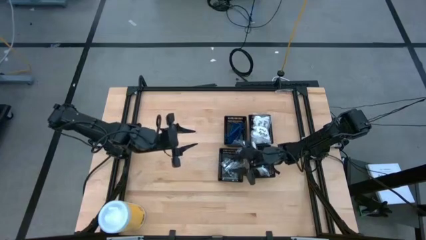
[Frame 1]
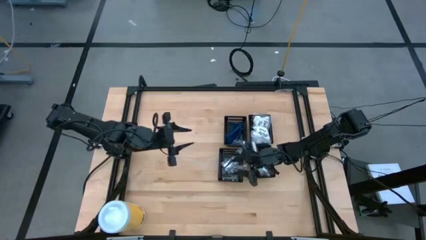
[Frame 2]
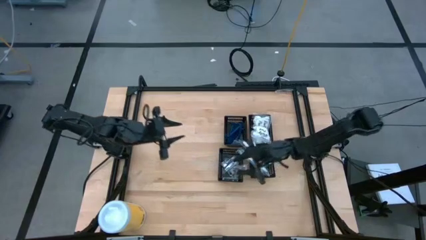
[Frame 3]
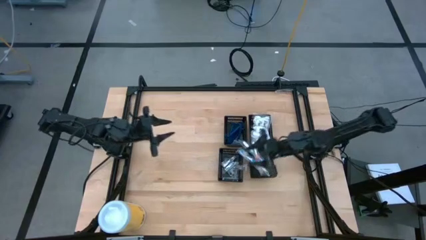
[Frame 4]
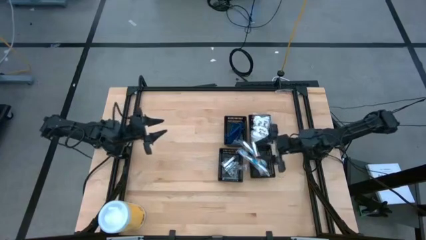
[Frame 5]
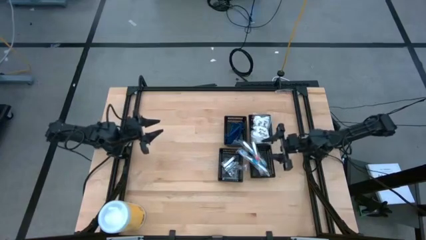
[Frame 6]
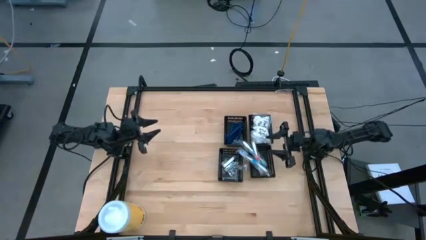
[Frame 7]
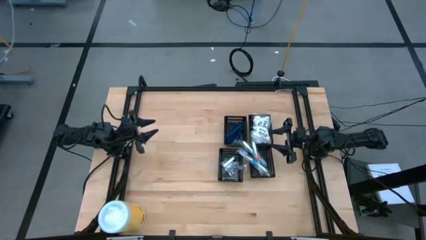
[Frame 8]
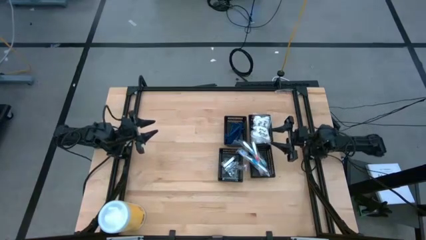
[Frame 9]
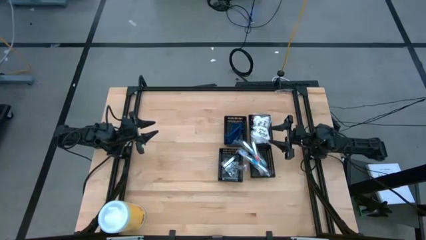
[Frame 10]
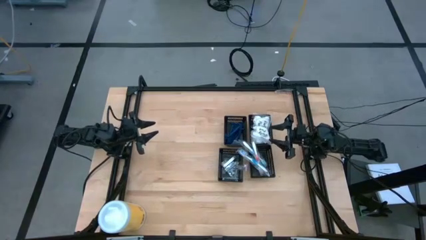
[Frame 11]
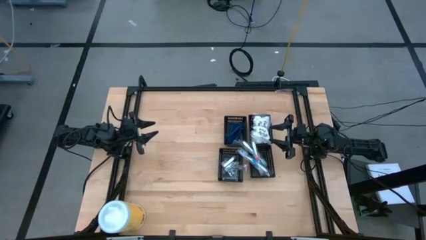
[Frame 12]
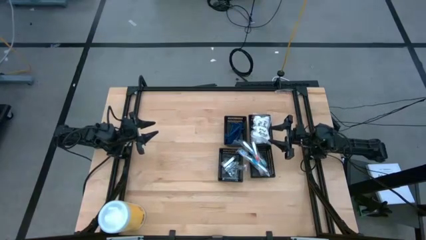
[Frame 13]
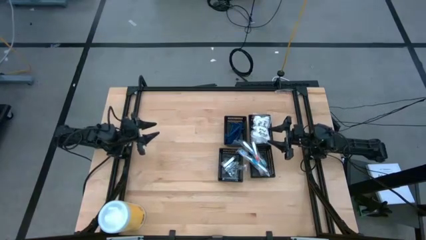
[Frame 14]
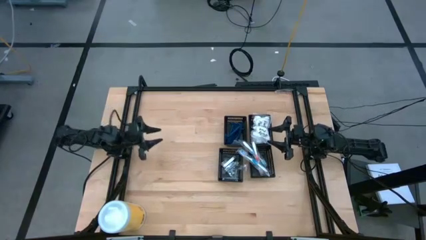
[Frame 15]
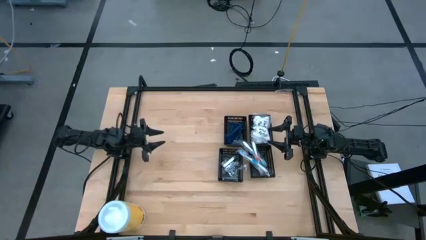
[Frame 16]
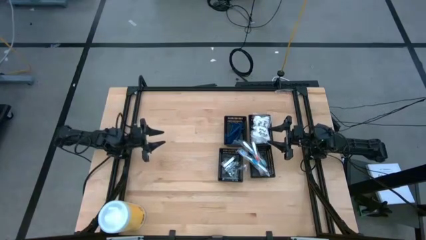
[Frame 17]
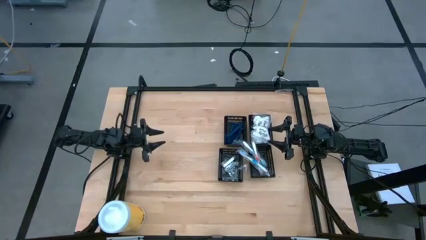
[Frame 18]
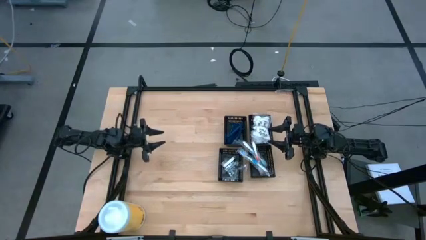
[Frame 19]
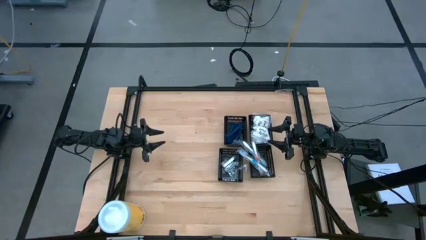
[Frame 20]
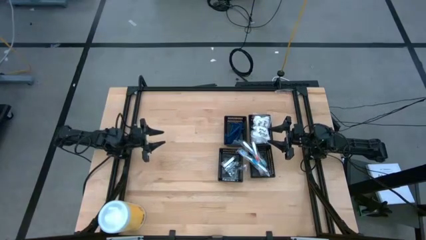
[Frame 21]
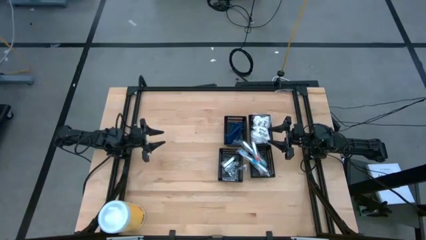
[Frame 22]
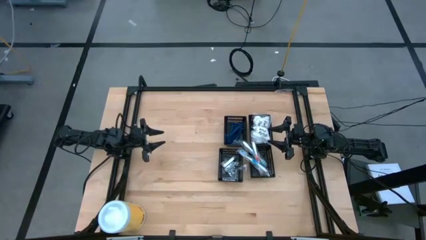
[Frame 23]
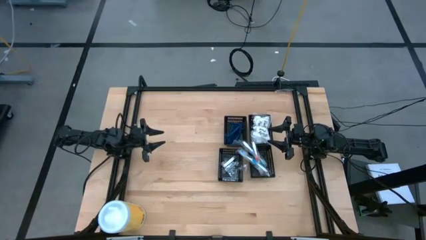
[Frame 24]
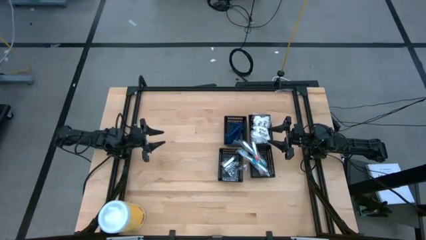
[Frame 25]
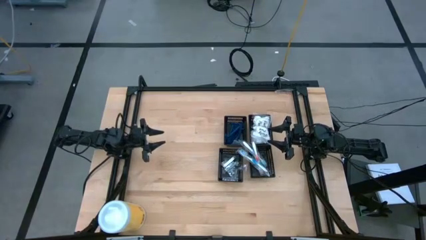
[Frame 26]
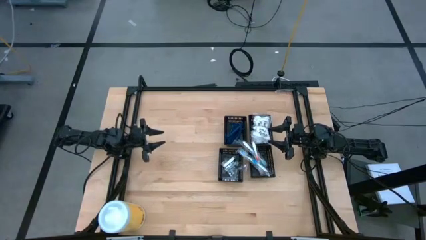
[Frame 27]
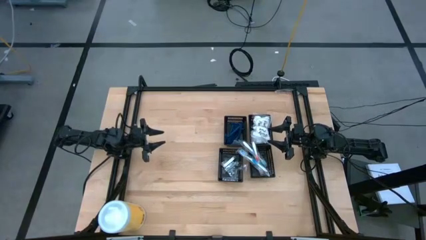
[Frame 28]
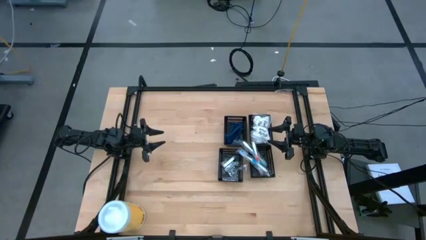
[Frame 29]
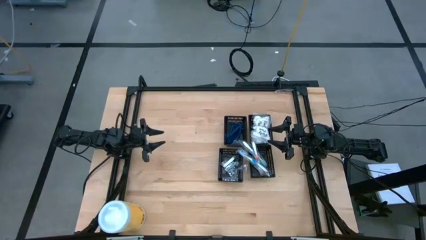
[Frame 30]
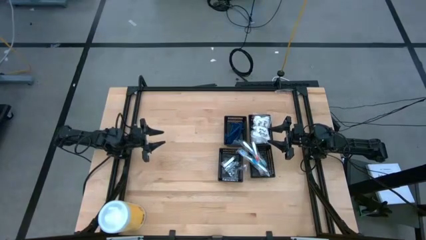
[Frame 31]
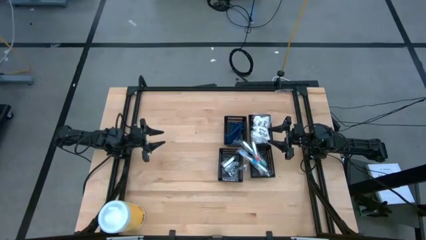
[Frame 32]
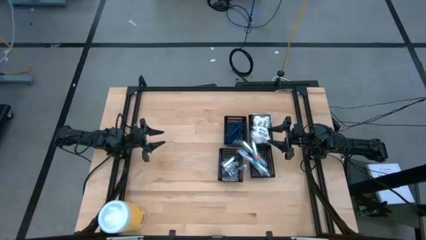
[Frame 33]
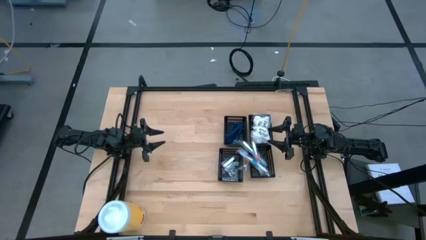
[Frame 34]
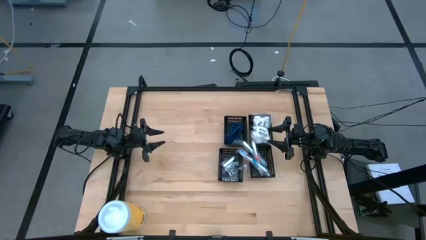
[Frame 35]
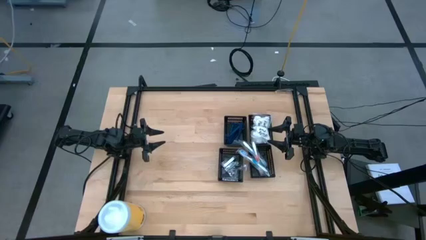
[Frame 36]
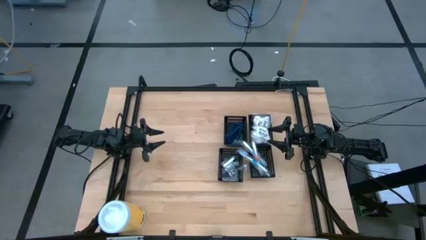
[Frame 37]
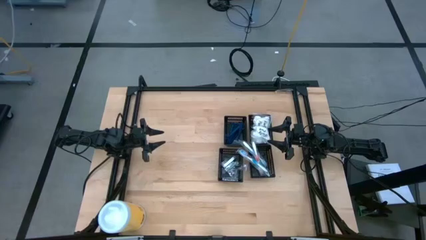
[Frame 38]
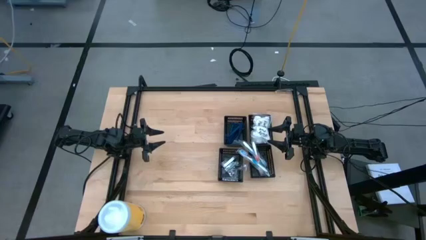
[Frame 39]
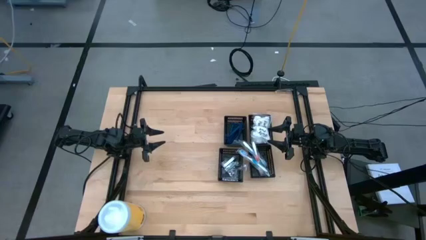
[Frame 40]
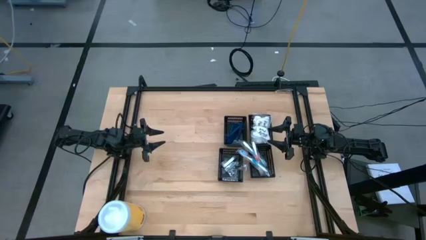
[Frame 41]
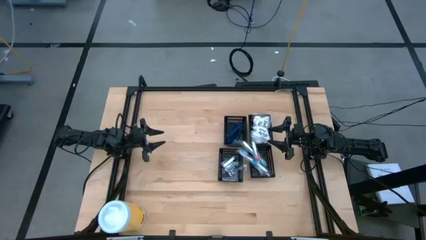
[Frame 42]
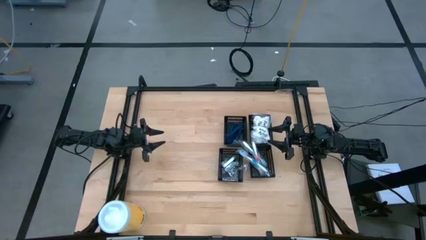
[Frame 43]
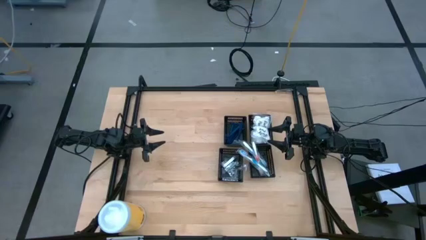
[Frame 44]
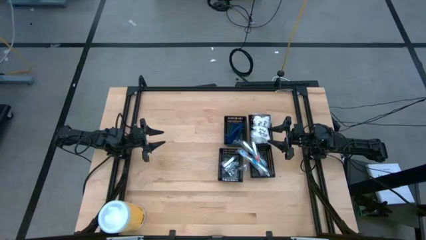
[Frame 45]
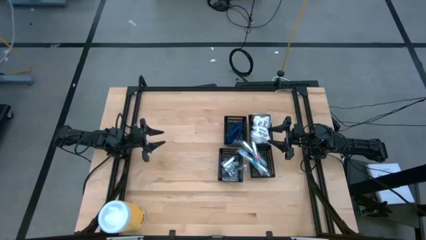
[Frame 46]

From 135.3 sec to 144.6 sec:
Task: Pick & Place Travel size toiletries
Return to Home Position

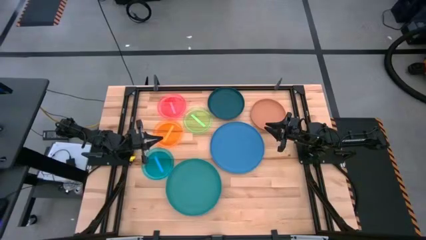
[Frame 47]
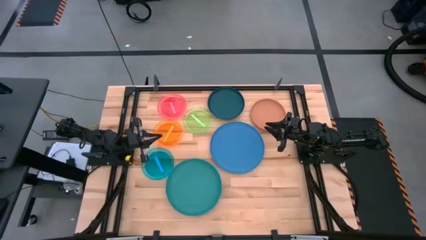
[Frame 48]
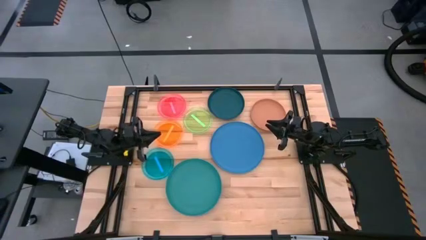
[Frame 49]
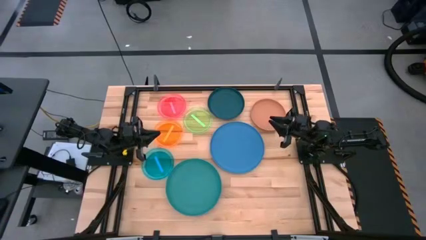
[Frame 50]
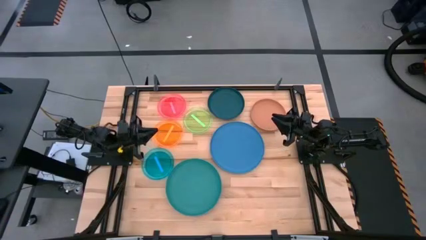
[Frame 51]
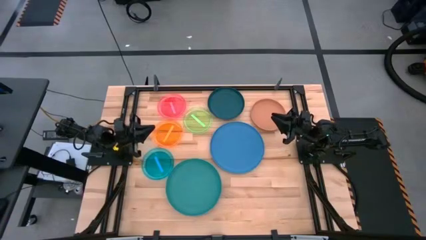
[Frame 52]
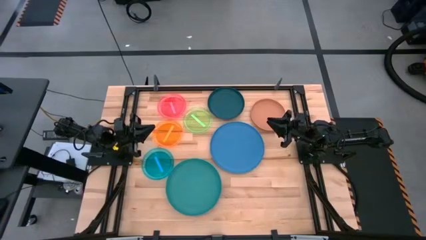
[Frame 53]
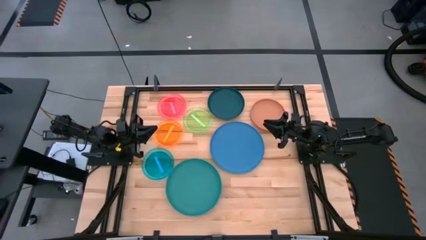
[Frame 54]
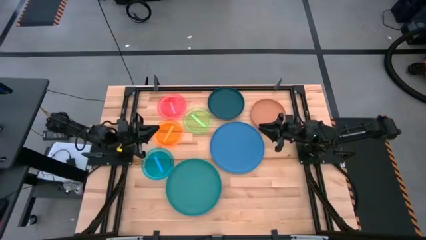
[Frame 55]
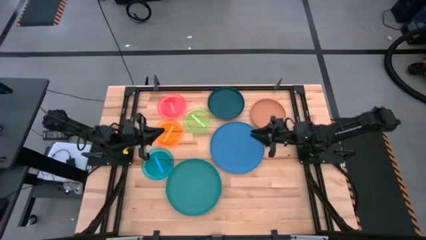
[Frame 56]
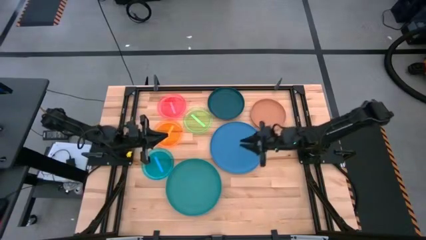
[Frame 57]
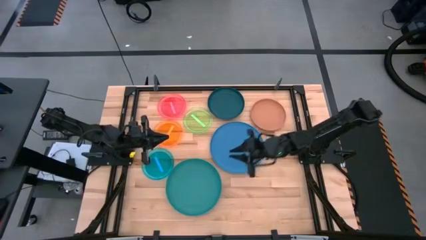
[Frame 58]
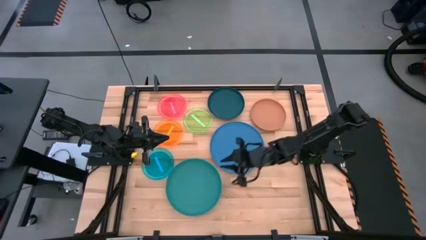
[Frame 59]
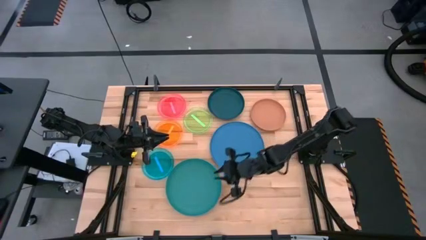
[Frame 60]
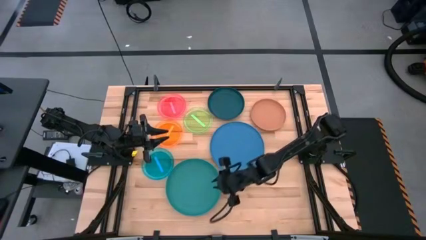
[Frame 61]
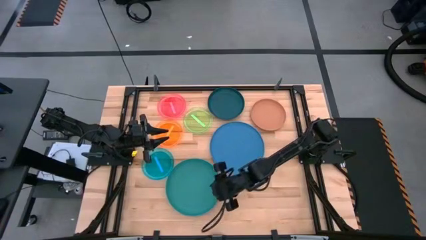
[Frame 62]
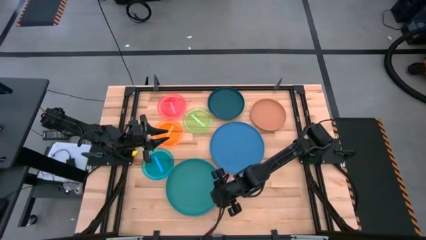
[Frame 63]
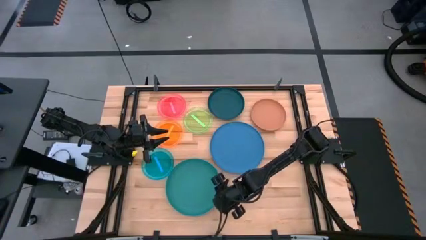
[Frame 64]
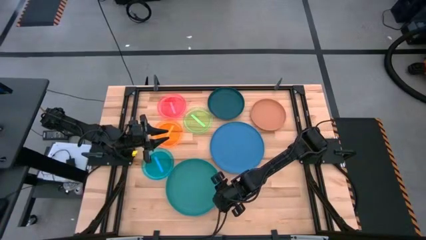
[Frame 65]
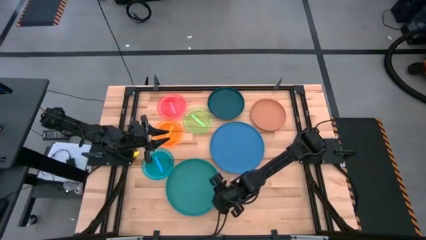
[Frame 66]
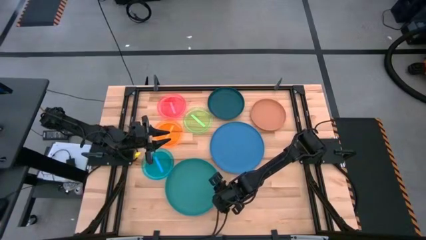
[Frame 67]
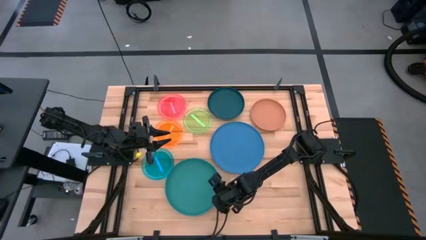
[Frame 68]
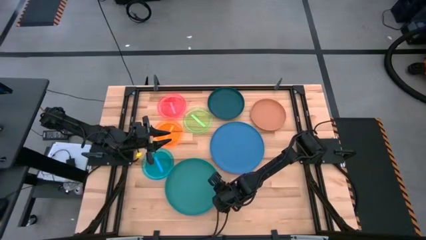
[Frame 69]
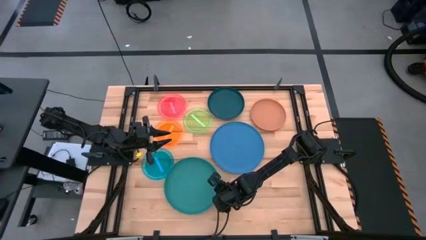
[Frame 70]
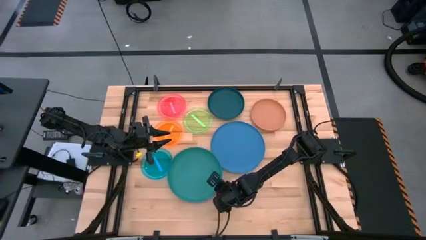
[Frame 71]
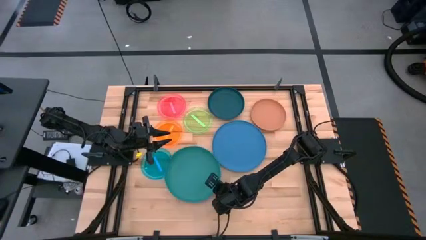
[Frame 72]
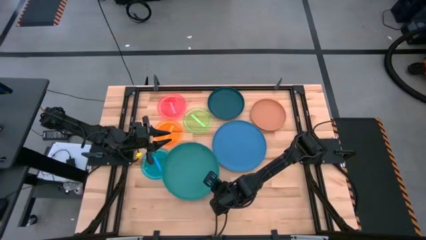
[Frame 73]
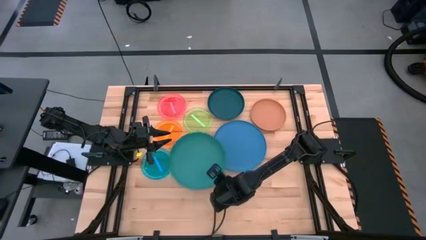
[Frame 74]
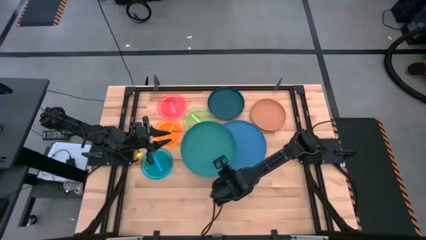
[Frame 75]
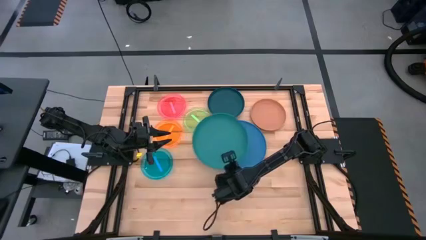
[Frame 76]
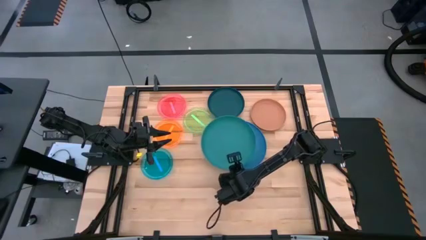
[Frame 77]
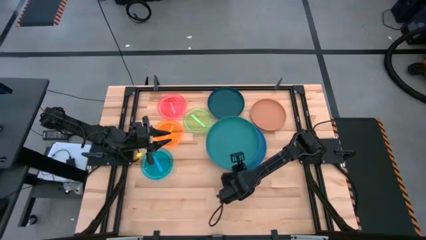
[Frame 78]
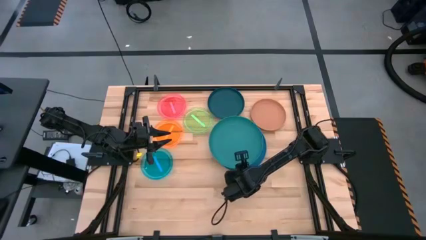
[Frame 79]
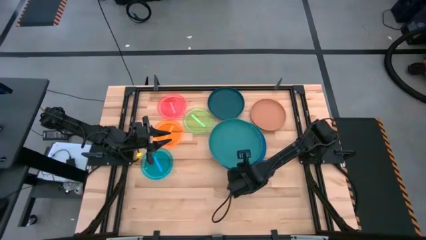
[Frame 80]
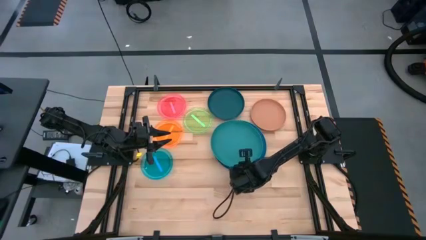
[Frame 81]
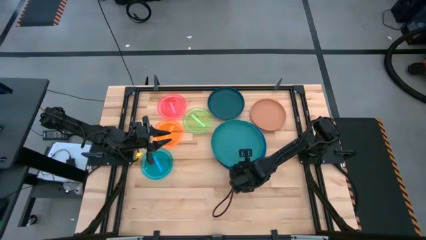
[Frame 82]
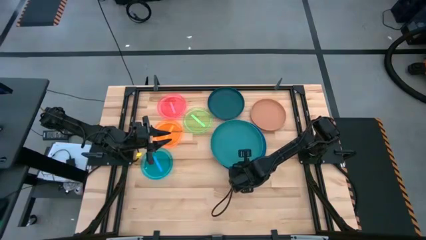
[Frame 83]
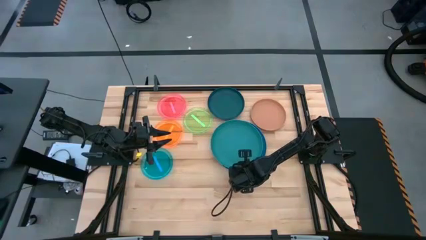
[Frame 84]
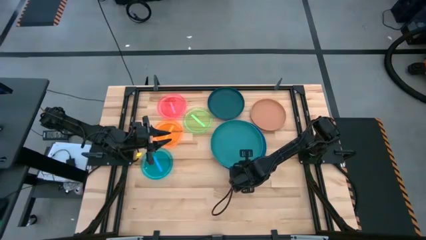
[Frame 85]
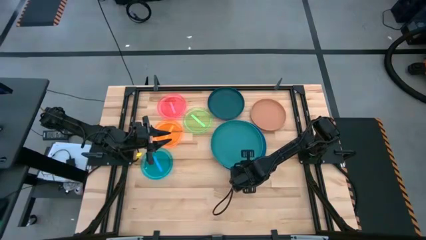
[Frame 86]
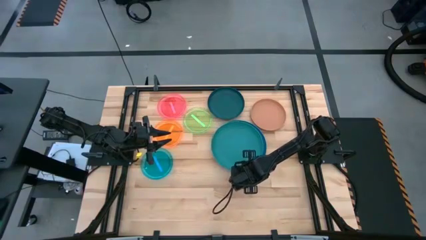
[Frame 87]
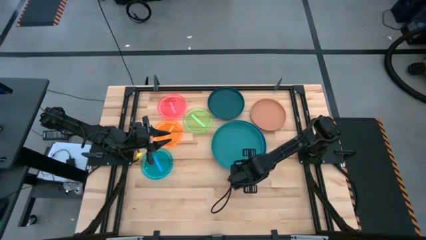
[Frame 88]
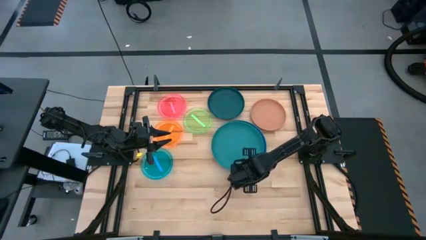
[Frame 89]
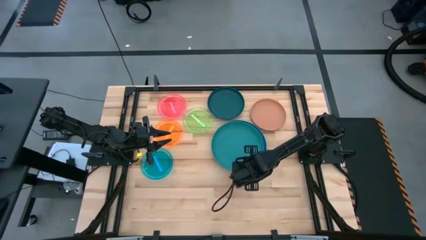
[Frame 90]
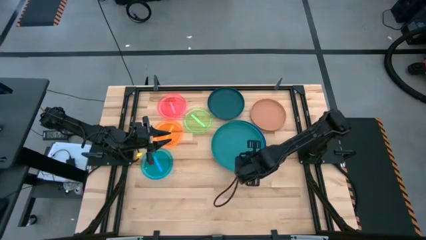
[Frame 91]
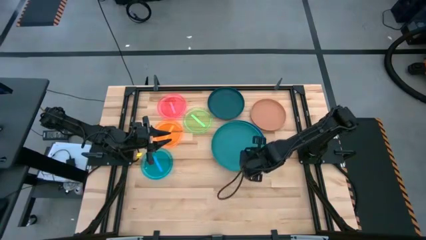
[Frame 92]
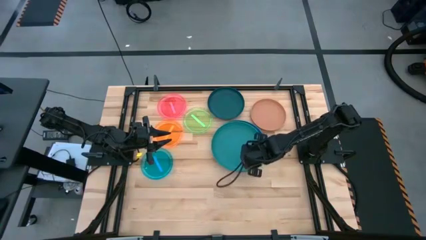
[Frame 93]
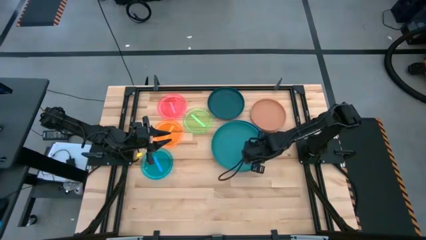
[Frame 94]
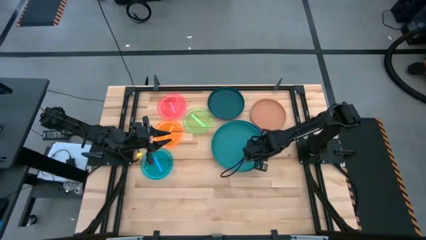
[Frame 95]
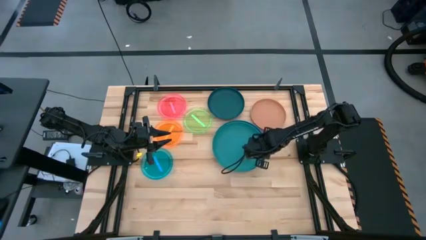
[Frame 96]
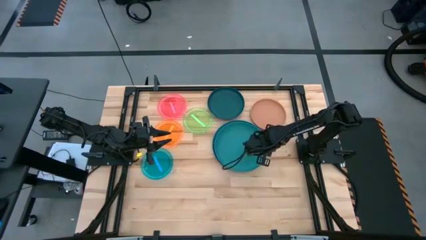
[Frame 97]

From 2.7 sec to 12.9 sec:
Task: Stack plastic plates
Stack the green plate on top of the blue plate
